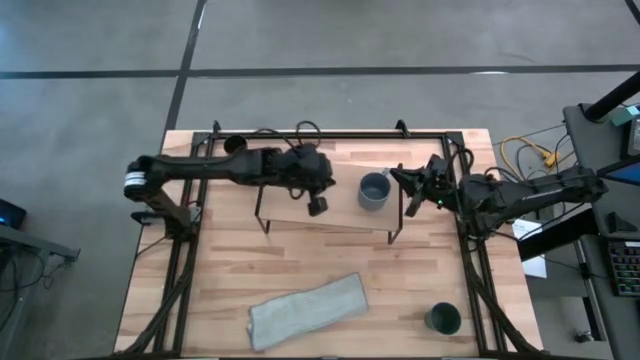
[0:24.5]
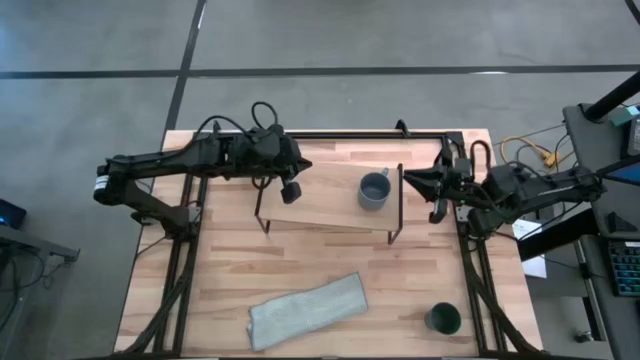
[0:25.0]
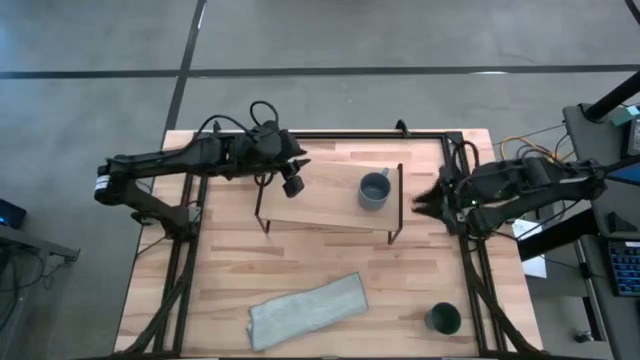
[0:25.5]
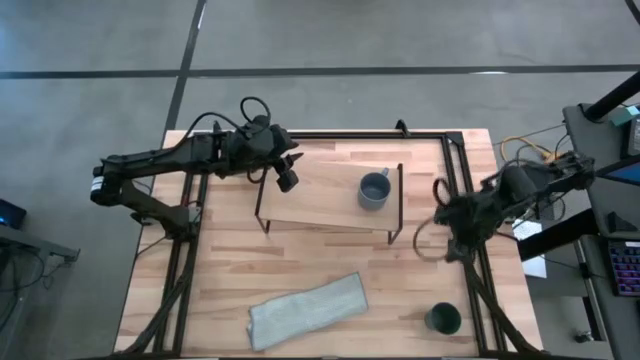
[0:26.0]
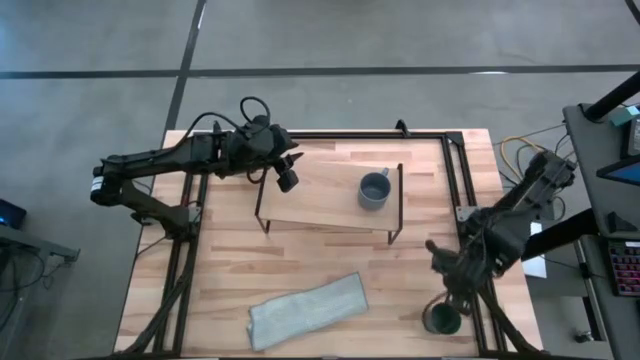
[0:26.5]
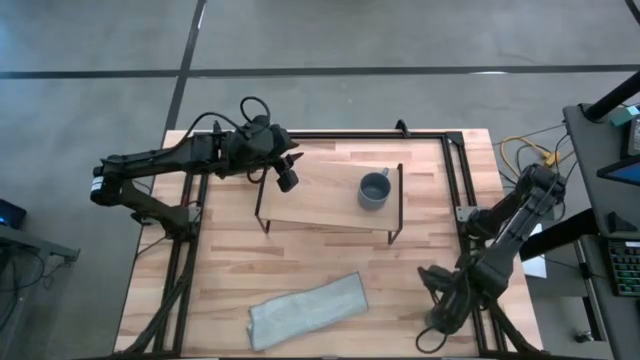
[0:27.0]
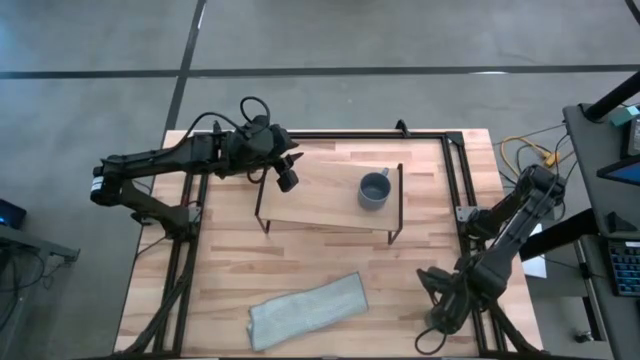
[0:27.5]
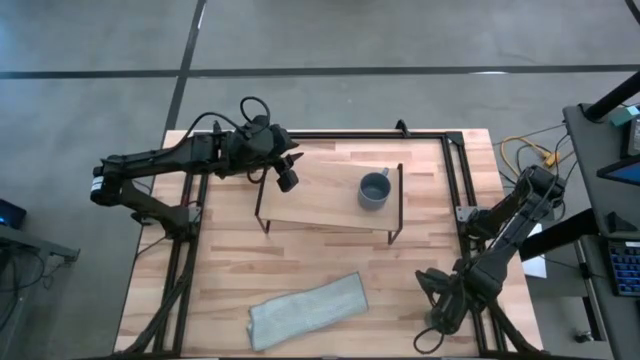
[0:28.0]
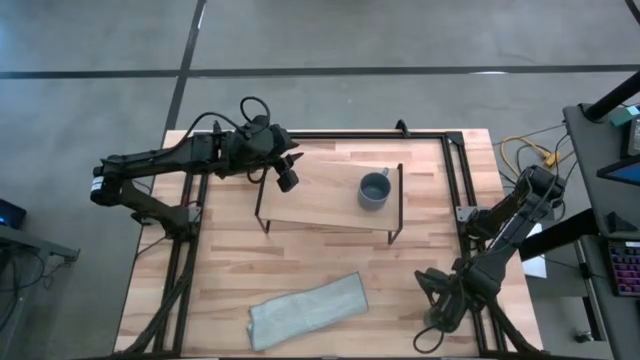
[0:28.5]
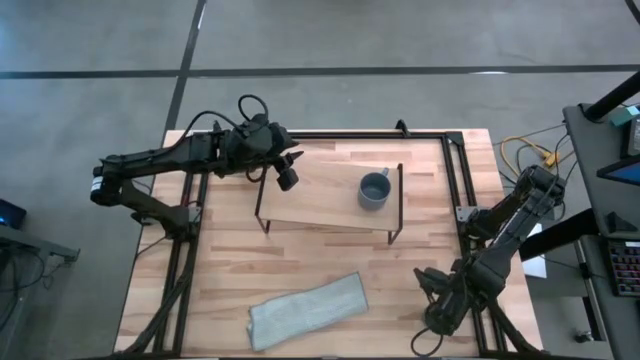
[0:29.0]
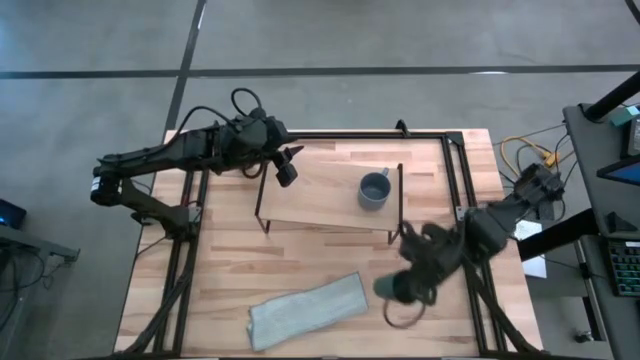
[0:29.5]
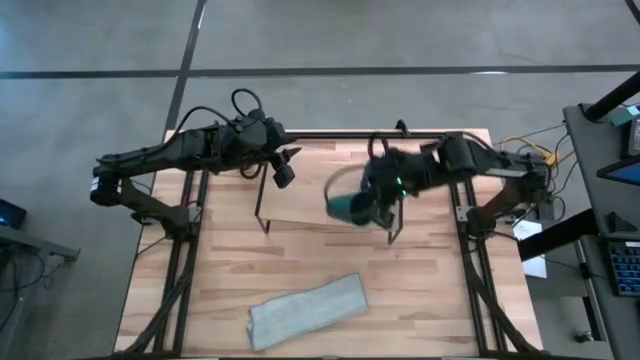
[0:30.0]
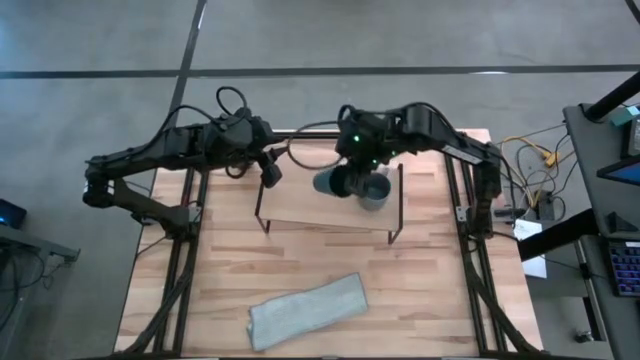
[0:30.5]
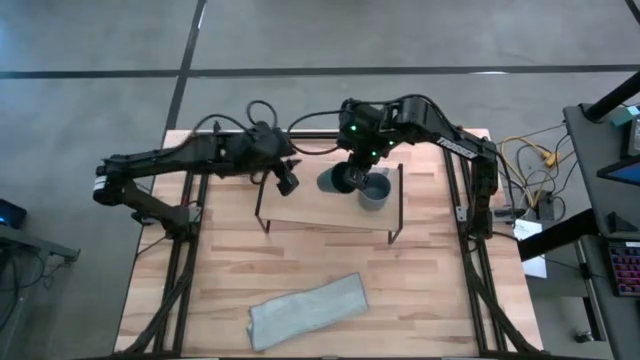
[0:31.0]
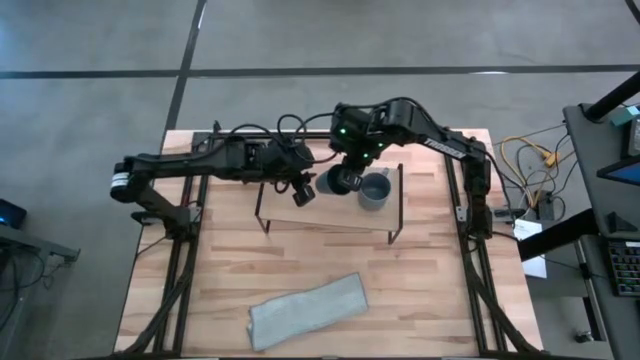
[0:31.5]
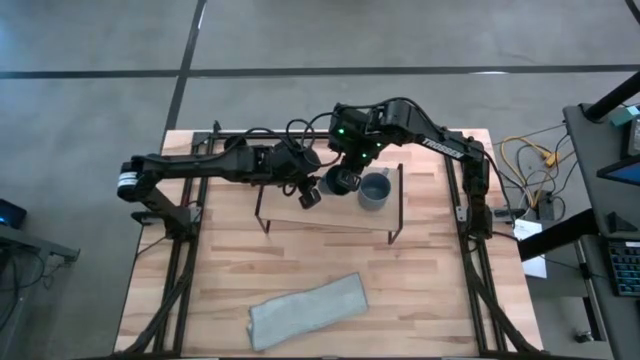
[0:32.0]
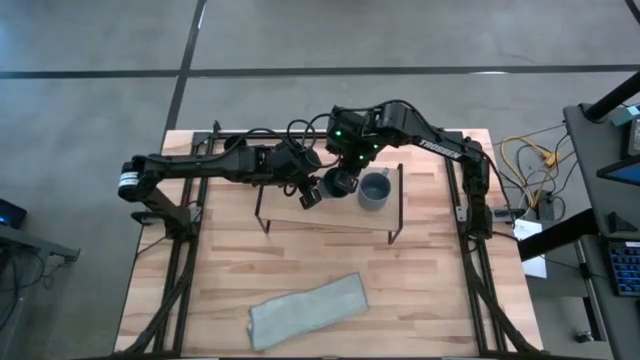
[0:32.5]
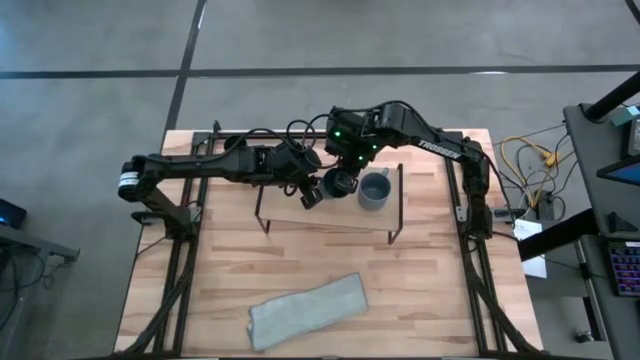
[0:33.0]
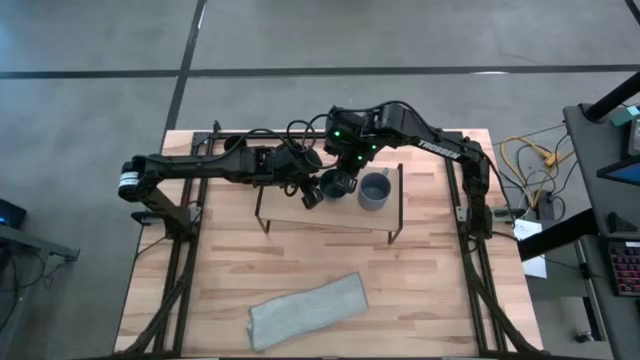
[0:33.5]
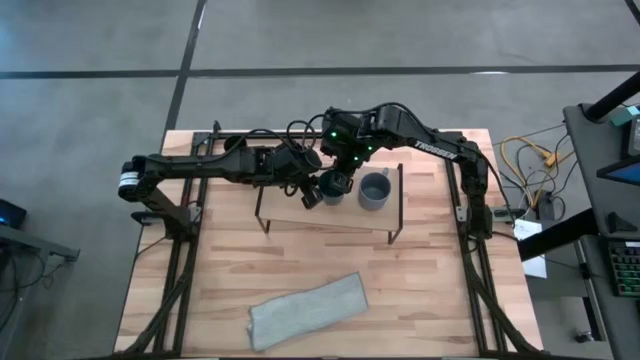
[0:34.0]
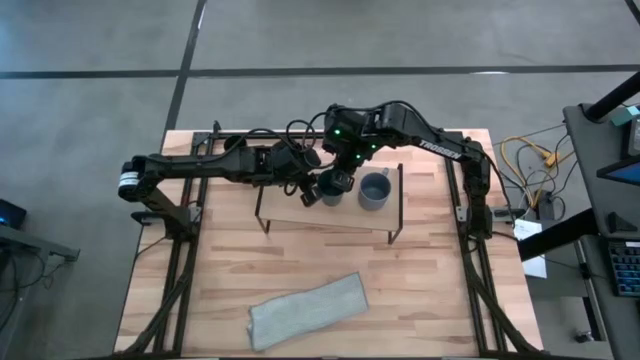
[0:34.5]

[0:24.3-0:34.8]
Task: Stack small to large cups/mugs on shelf
Put the green cup on the shelf

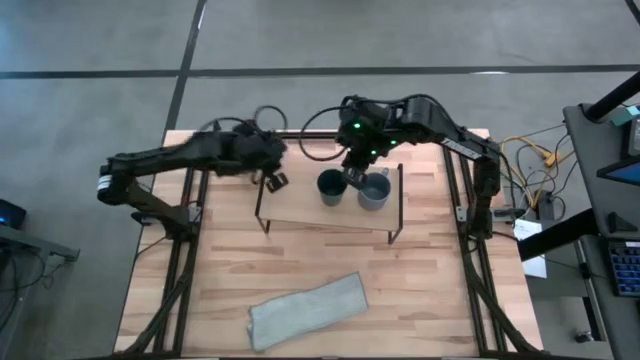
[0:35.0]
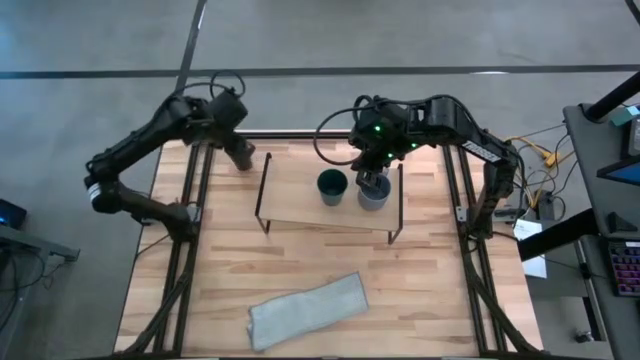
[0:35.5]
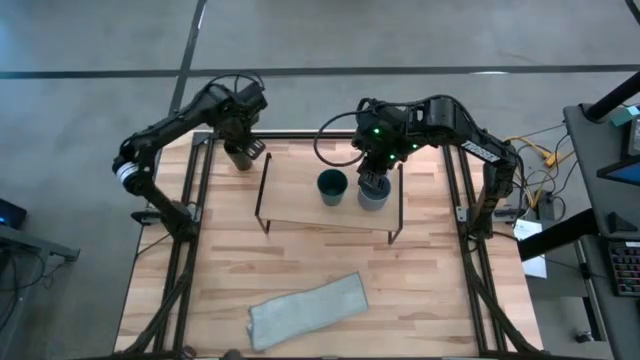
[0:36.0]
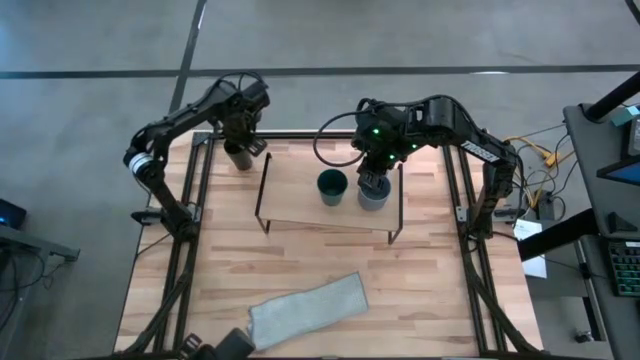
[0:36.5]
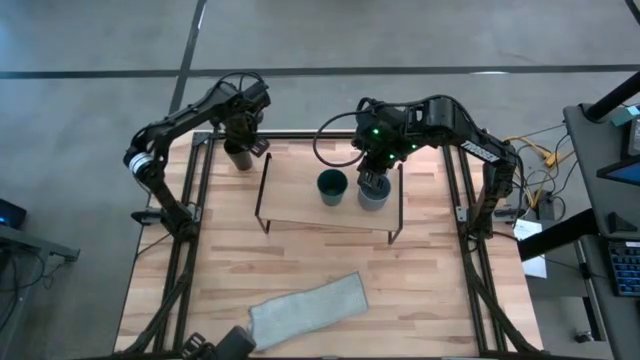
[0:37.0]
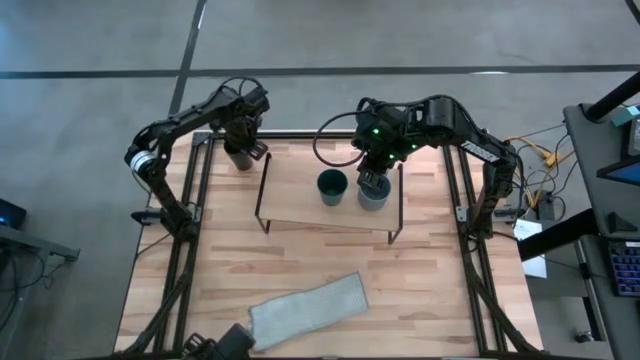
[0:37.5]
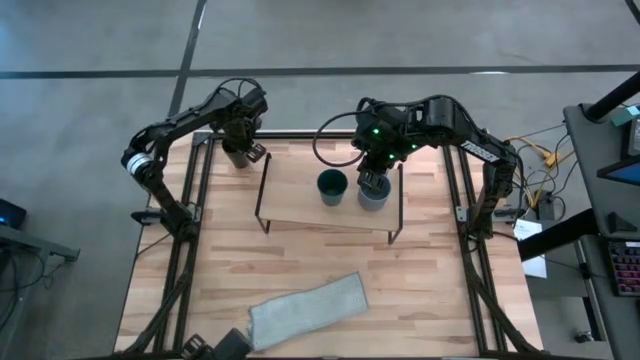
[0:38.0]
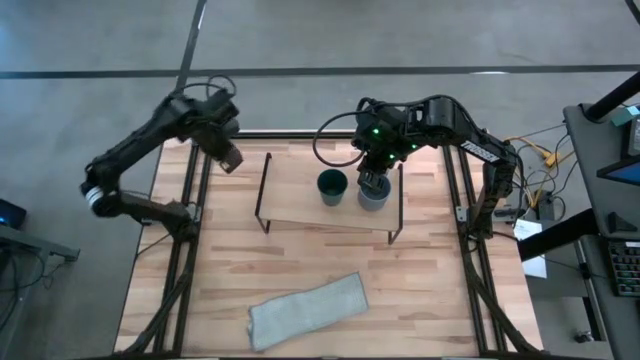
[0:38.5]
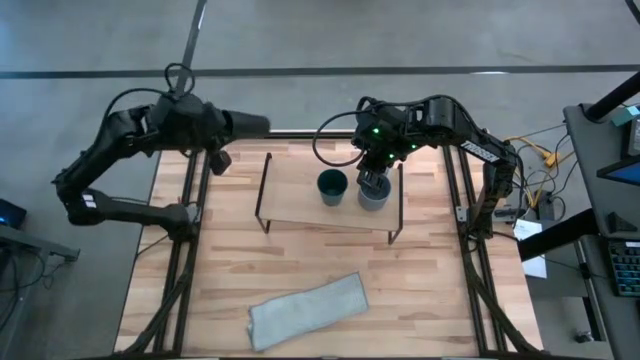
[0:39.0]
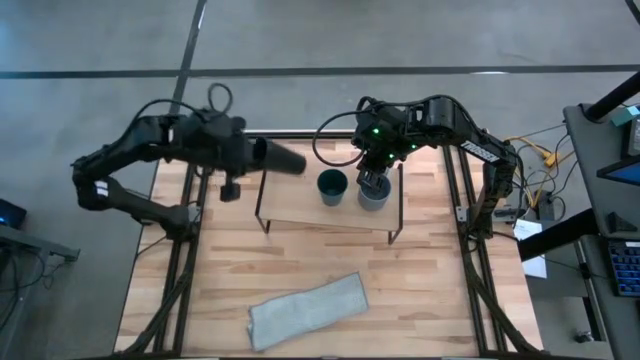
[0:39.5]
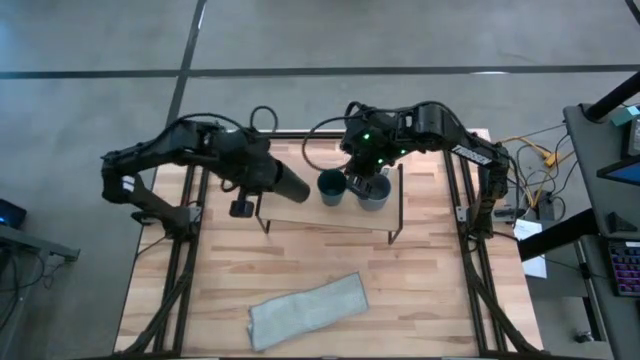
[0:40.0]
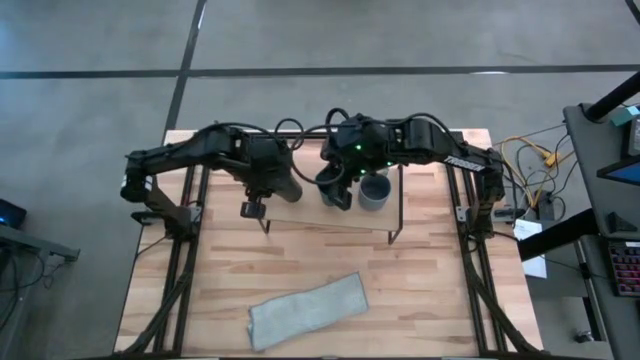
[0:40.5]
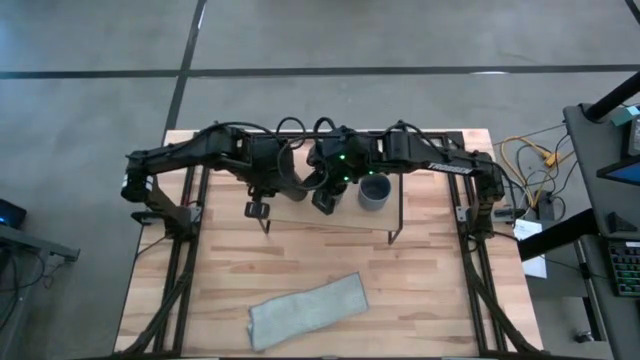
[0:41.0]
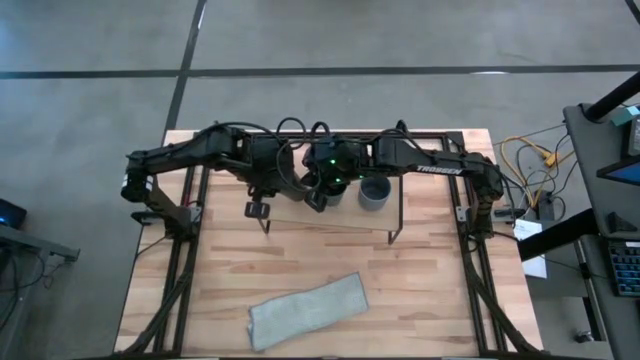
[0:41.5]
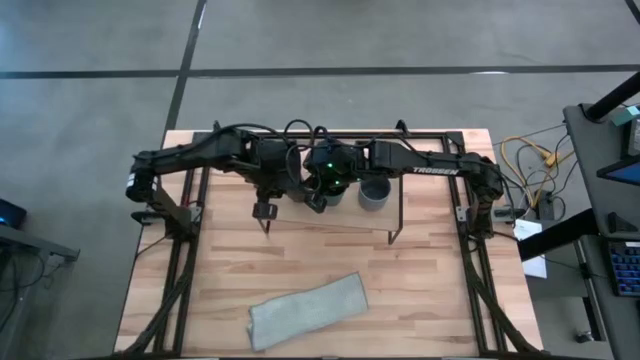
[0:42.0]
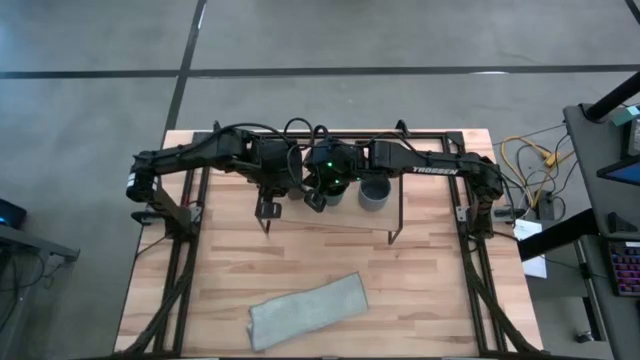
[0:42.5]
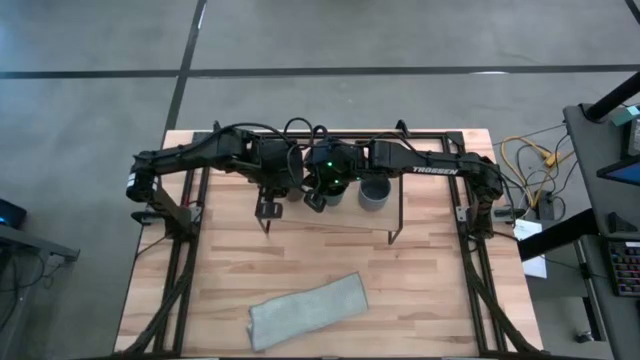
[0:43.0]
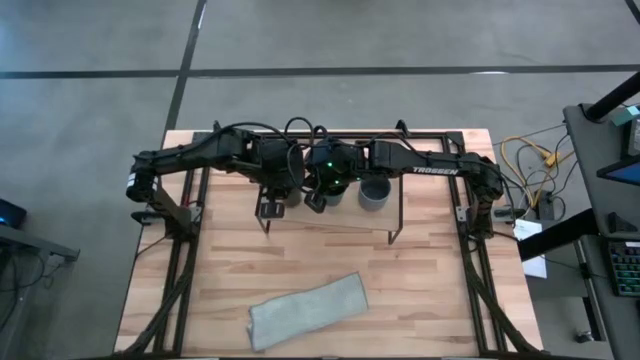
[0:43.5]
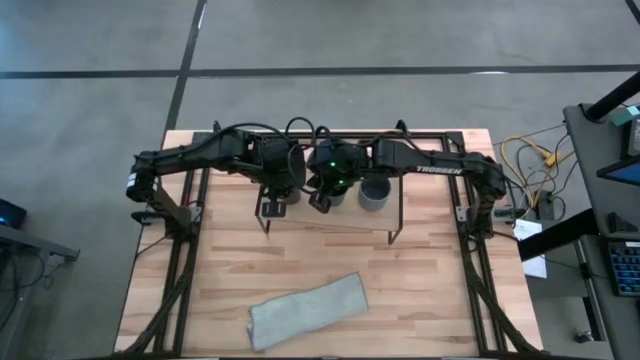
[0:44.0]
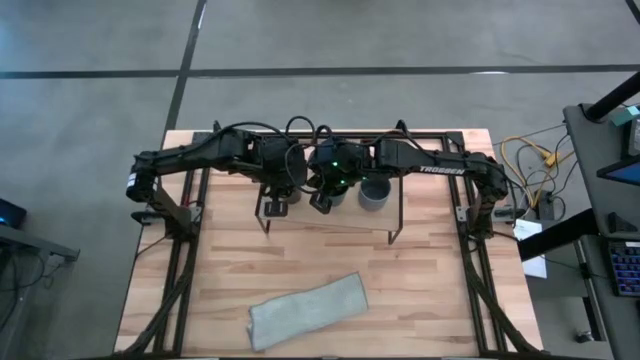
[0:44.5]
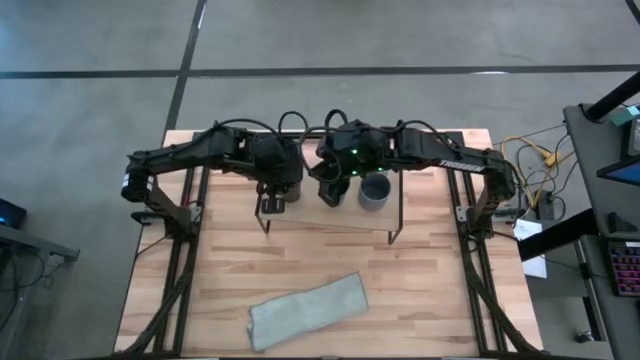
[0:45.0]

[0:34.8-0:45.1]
Put the black cup on the shelf
